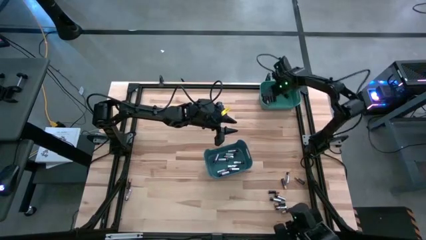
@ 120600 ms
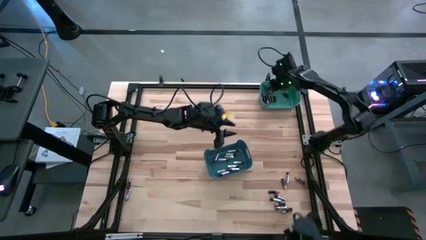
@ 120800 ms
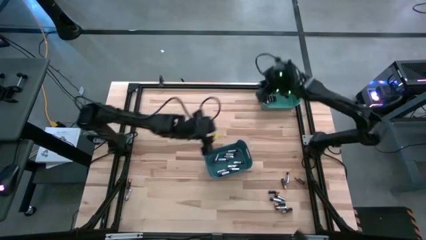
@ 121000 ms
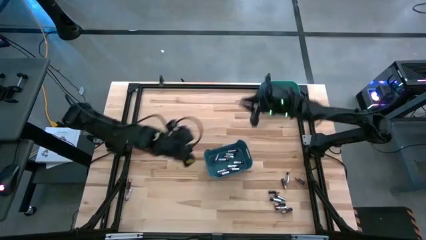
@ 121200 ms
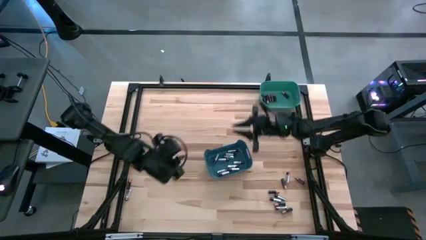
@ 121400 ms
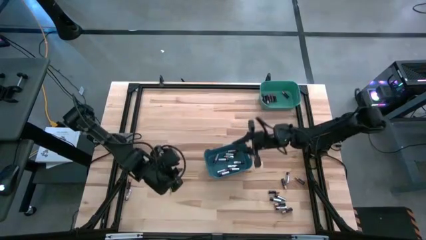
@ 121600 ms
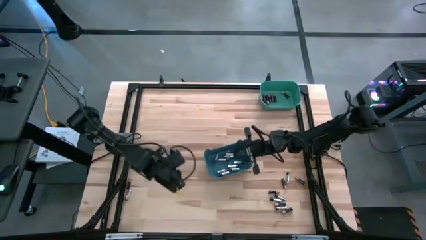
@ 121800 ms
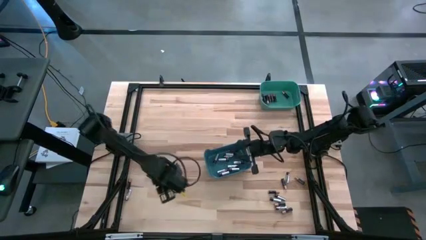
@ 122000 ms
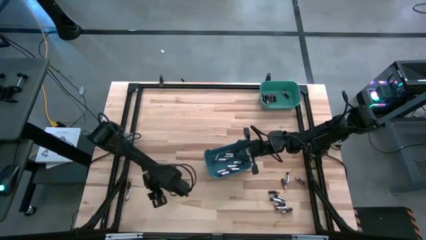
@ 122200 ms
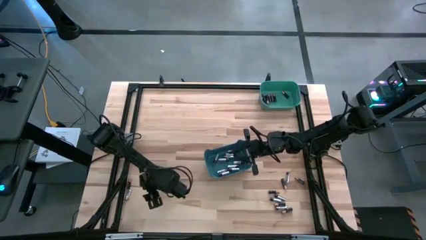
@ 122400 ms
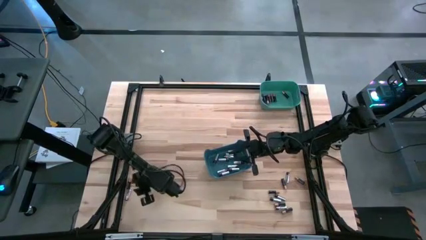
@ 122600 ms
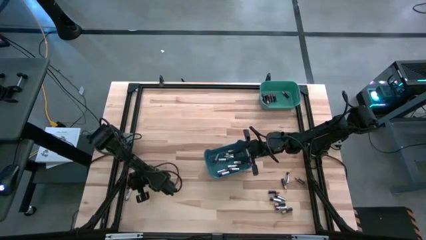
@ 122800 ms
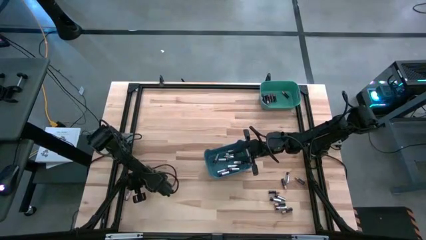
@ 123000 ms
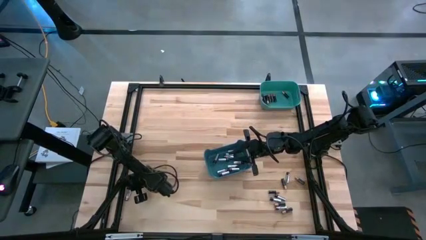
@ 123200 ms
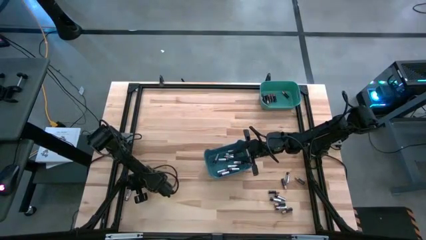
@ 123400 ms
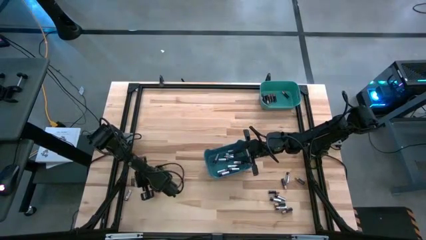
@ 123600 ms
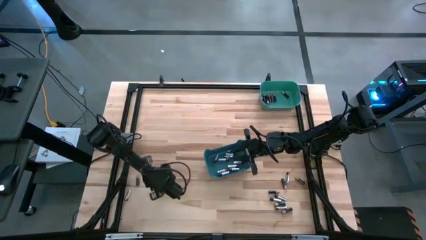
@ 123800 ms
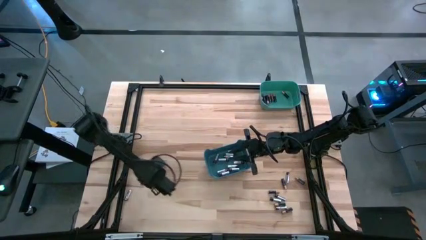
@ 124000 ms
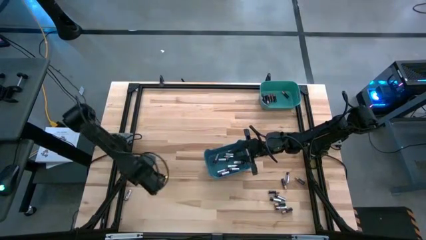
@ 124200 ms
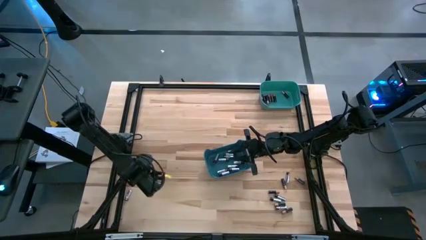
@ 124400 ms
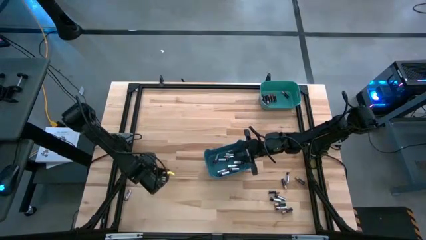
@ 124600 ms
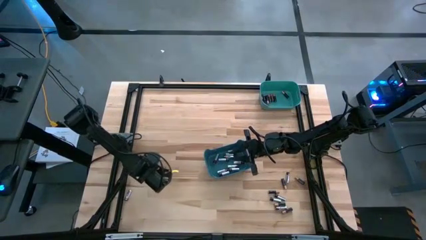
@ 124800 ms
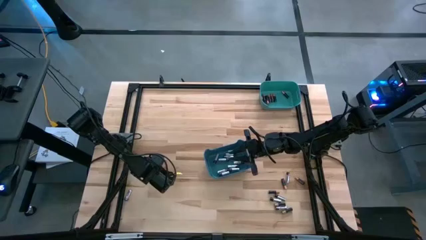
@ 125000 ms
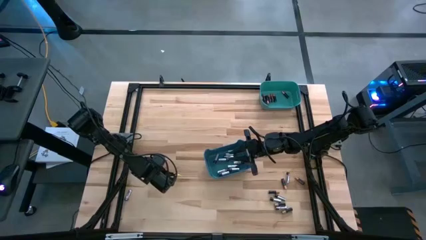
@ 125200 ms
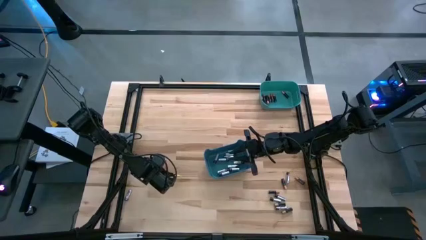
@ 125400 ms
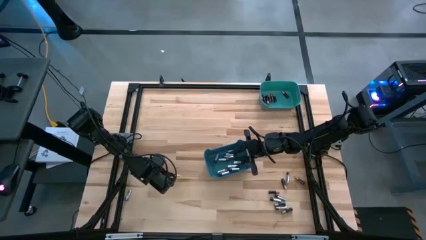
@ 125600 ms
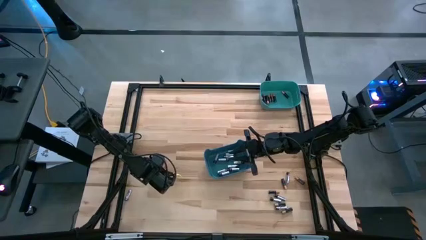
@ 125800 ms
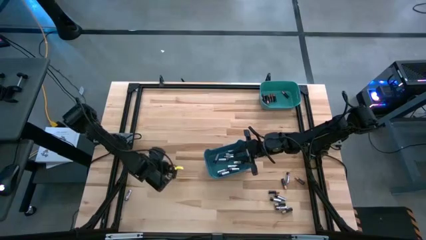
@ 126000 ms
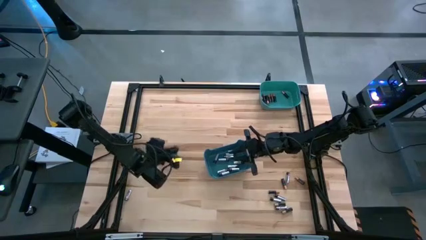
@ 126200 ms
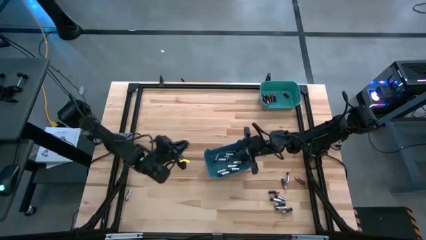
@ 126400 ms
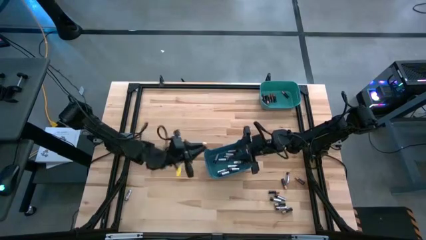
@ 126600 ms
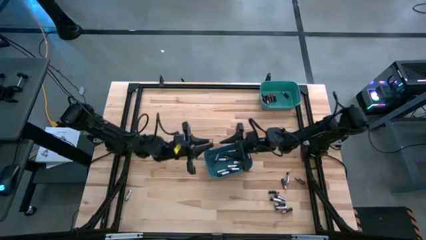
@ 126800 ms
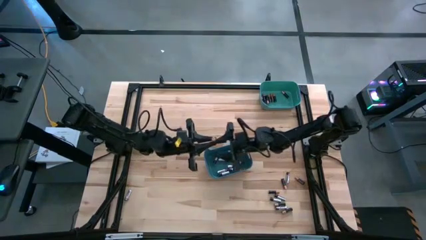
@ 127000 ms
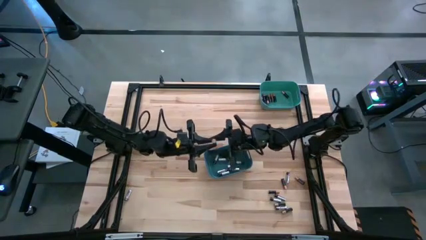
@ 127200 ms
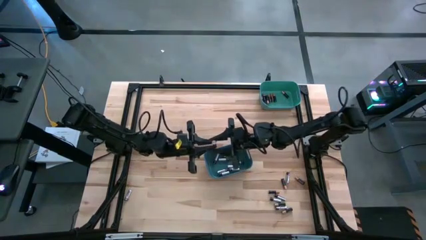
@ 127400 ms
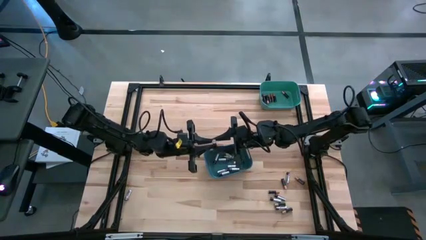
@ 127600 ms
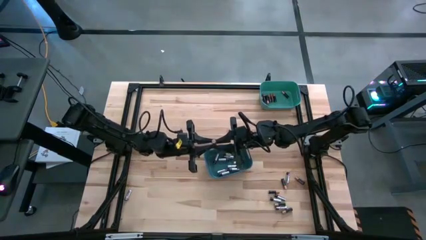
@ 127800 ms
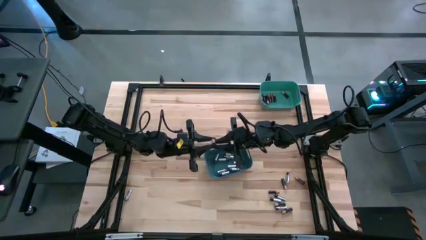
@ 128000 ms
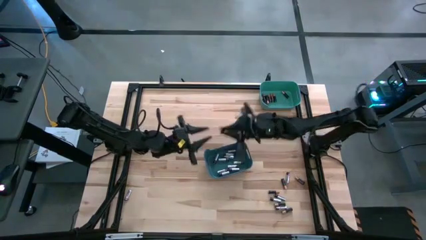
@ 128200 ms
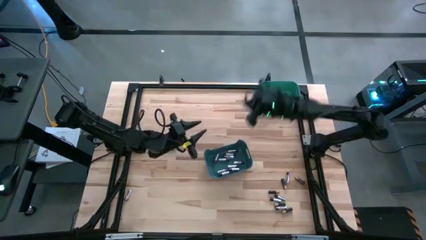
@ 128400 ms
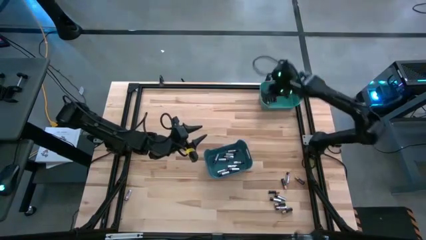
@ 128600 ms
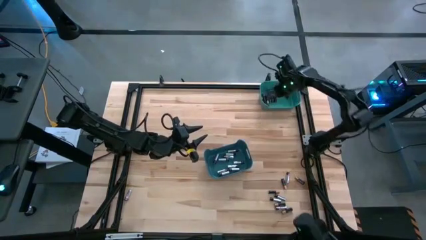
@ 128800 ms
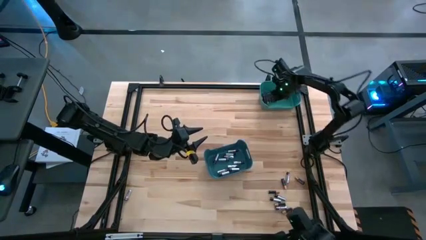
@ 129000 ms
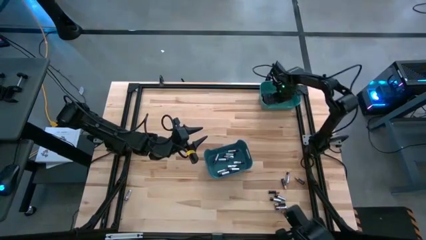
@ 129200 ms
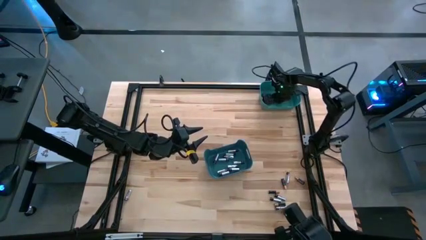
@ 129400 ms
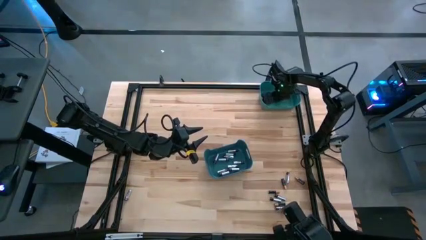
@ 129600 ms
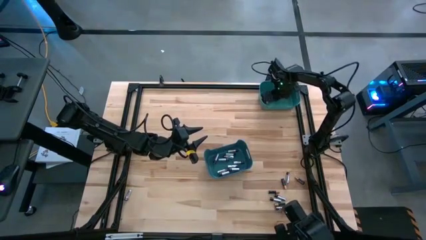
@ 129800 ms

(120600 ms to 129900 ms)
Task: Sort batteries
Put the black battery into the green bin

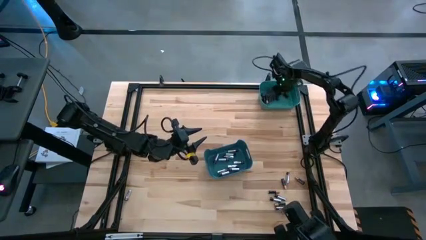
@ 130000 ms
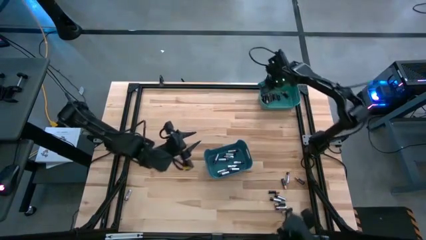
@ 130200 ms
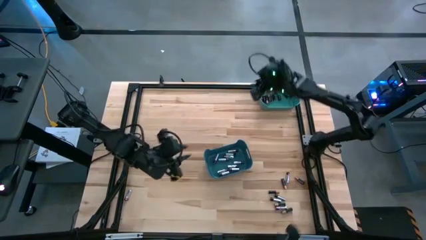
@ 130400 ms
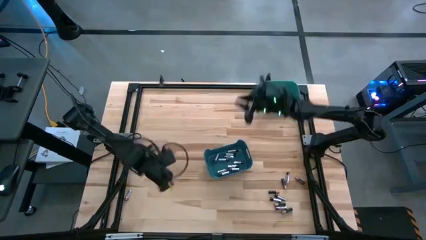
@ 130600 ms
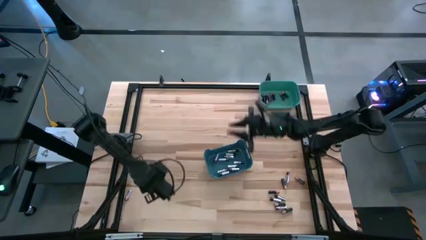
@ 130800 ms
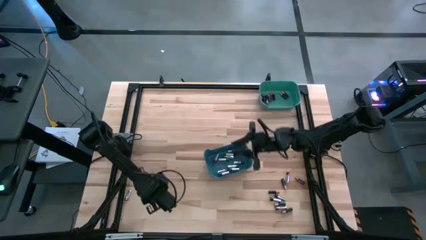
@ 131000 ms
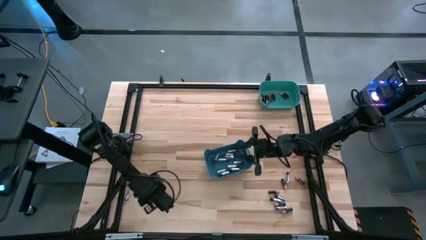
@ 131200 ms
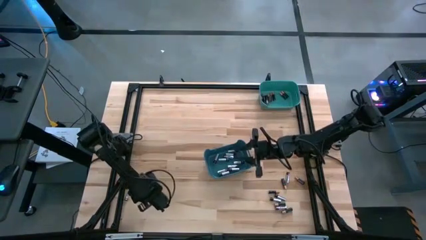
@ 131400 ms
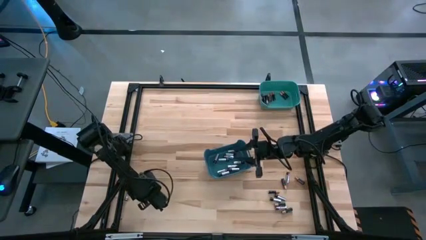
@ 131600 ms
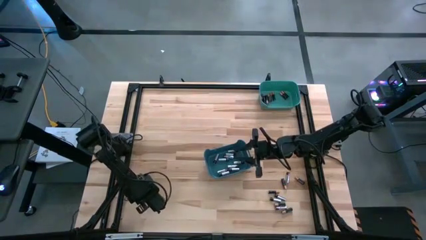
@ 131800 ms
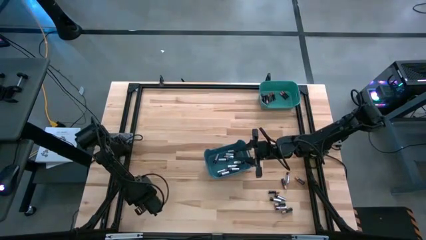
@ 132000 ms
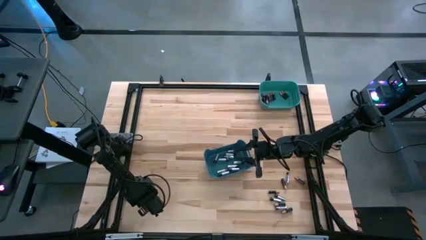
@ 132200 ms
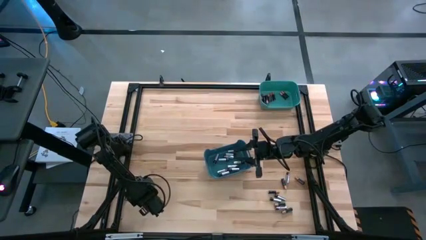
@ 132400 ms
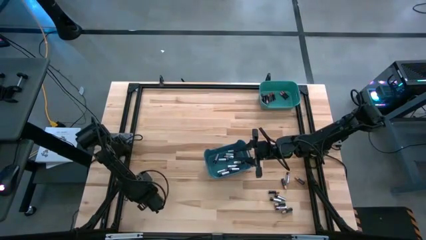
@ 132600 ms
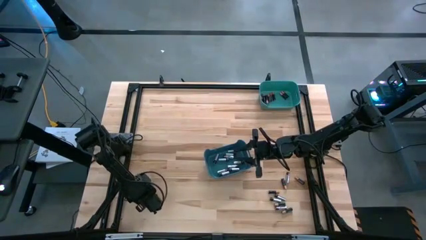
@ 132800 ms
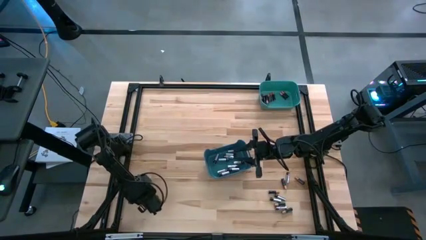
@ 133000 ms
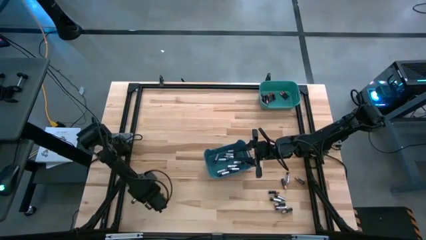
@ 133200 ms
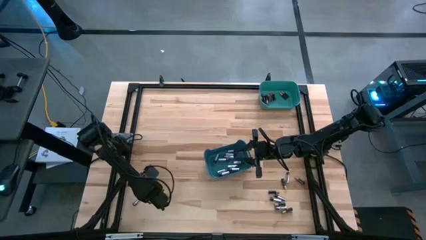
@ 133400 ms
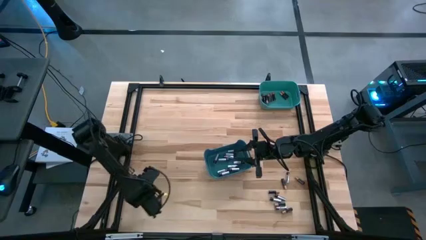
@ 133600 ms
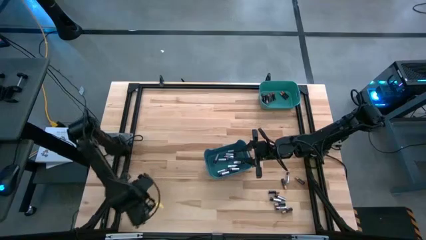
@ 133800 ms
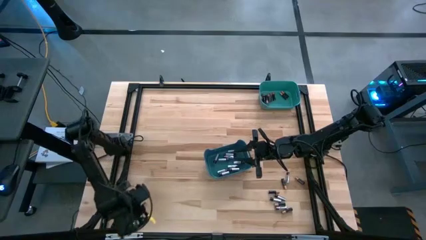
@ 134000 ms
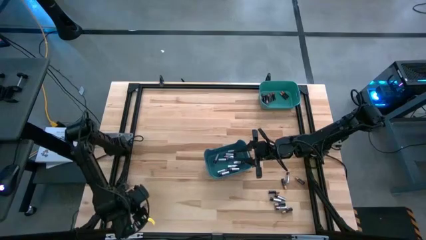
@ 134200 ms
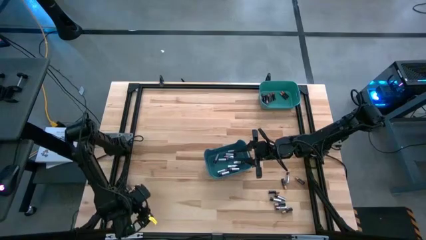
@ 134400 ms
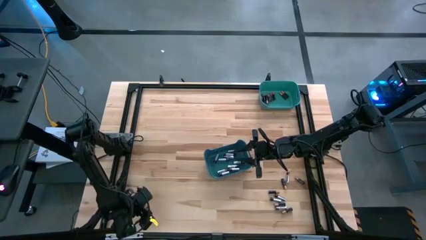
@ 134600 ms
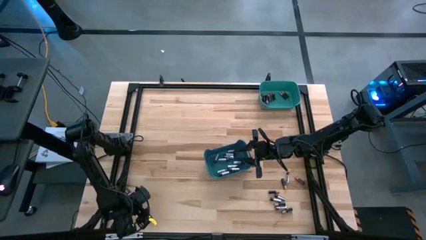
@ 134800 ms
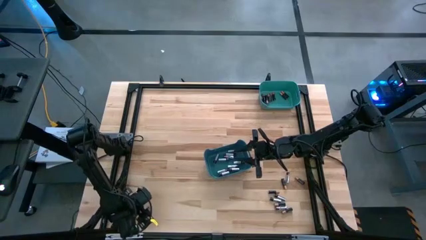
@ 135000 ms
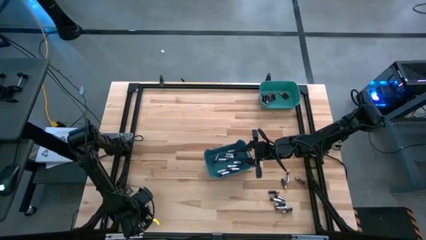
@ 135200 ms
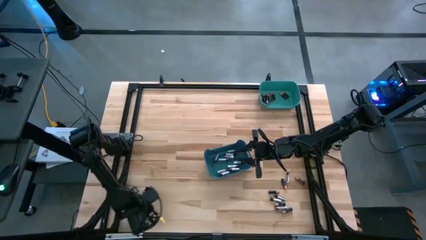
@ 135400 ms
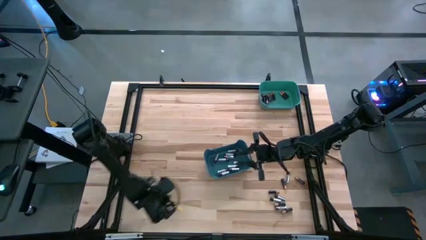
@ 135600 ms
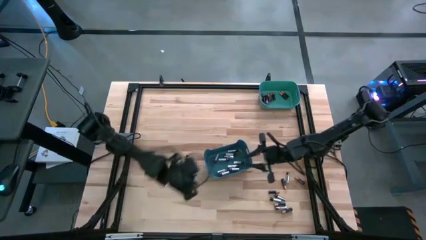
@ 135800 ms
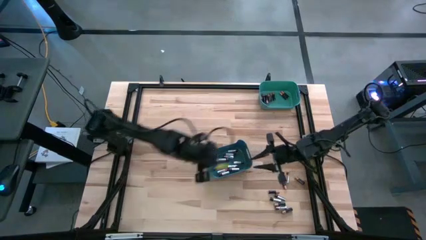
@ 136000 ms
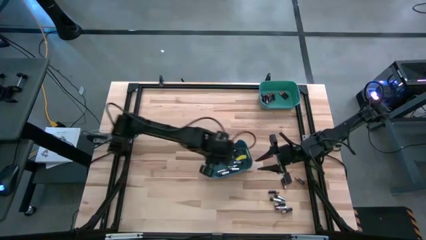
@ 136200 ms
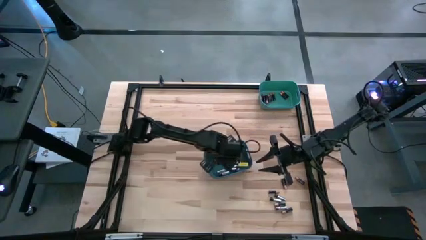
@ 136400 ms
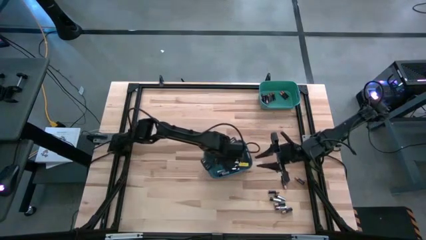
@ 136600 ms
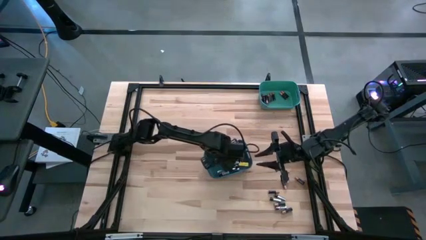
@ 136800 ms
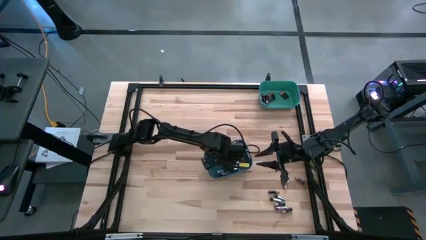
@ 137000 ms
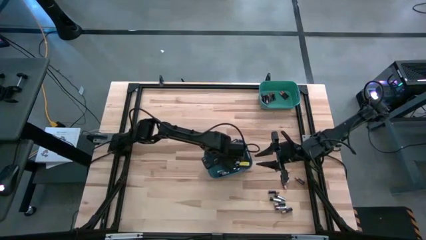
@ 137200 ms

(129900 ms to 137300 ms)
Put the silver battery into the blue bin
